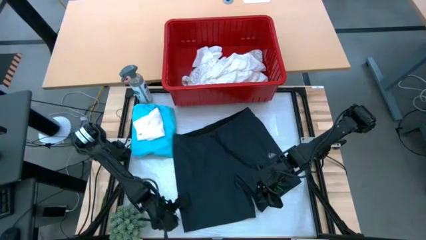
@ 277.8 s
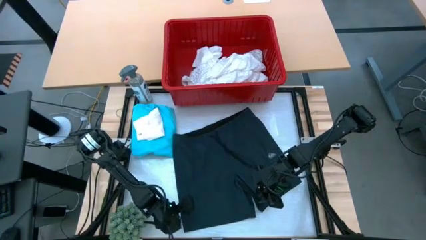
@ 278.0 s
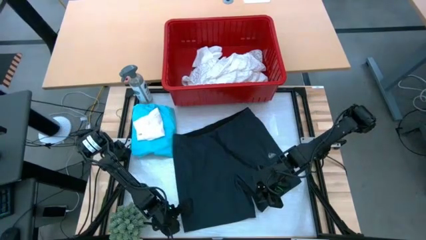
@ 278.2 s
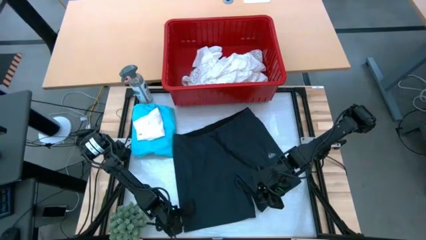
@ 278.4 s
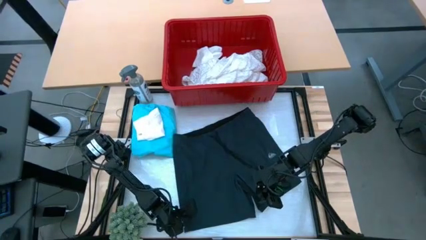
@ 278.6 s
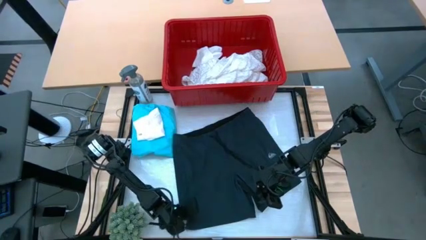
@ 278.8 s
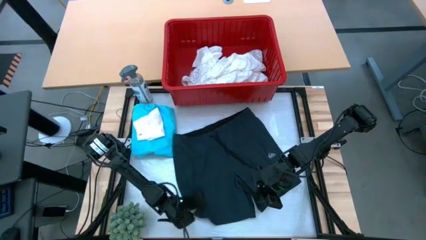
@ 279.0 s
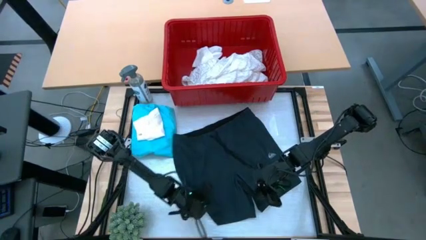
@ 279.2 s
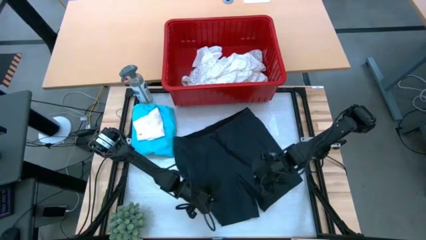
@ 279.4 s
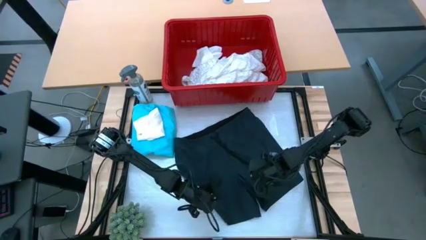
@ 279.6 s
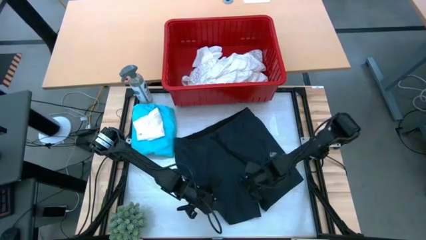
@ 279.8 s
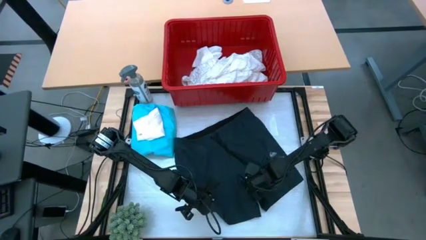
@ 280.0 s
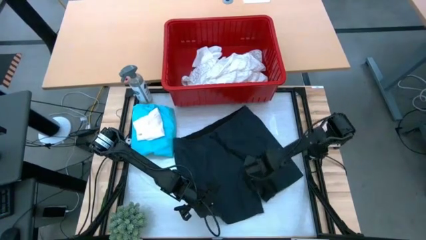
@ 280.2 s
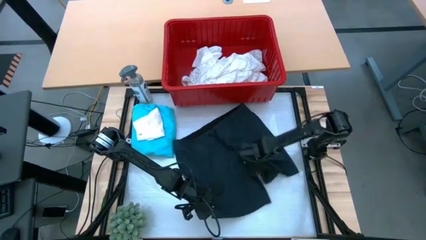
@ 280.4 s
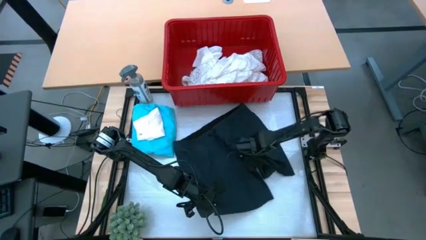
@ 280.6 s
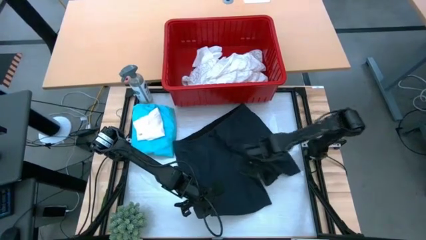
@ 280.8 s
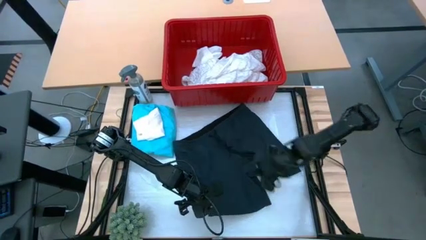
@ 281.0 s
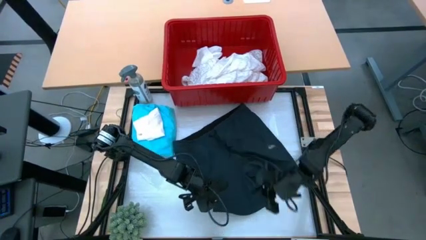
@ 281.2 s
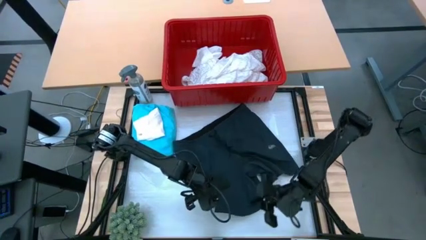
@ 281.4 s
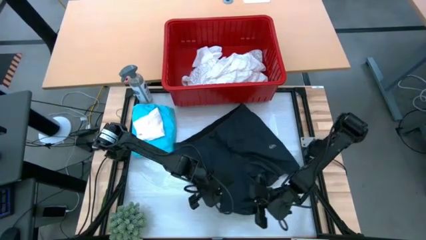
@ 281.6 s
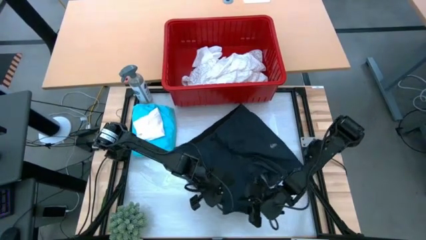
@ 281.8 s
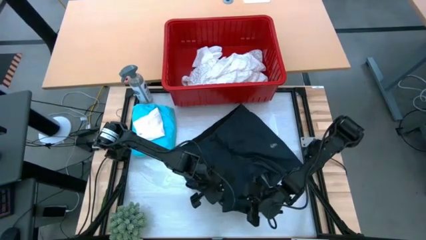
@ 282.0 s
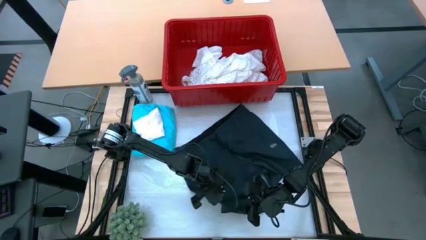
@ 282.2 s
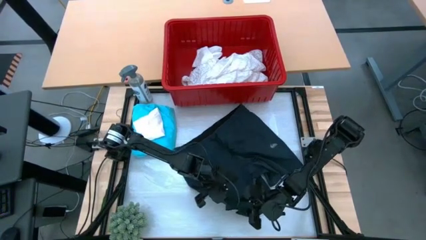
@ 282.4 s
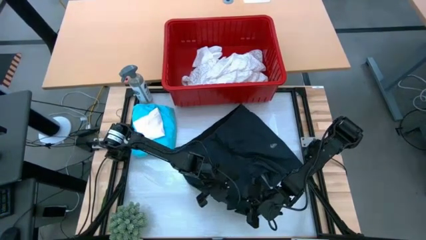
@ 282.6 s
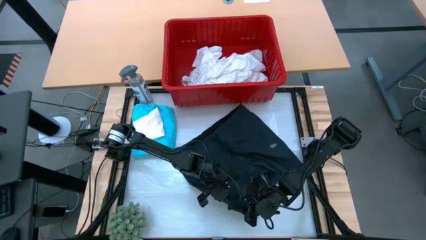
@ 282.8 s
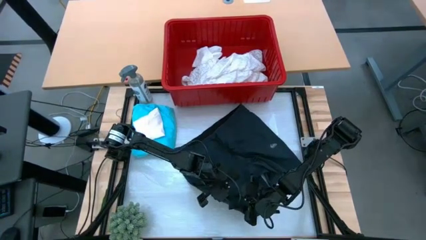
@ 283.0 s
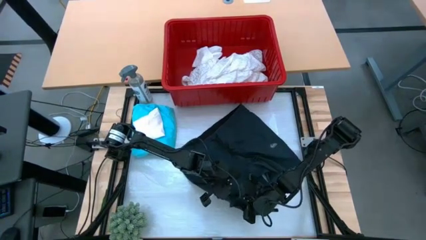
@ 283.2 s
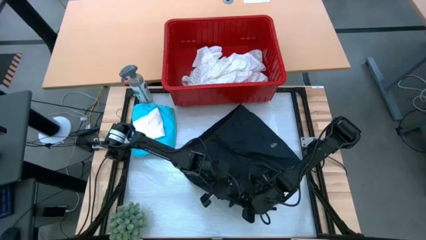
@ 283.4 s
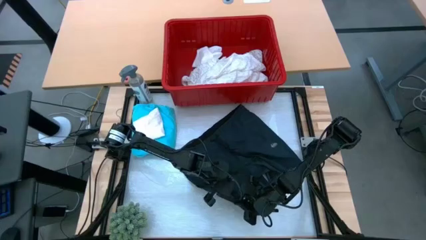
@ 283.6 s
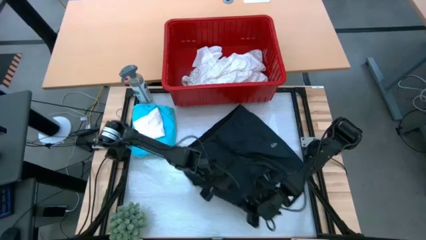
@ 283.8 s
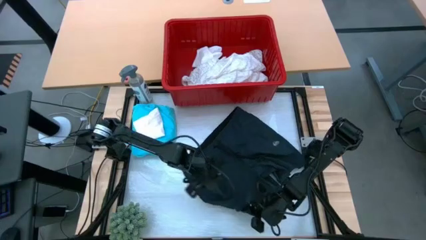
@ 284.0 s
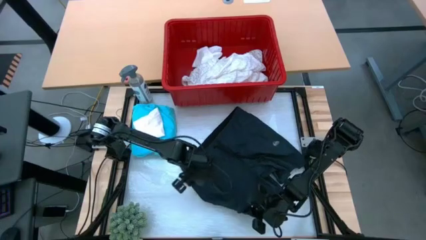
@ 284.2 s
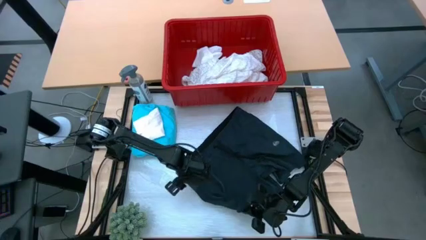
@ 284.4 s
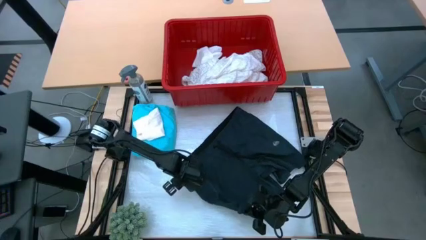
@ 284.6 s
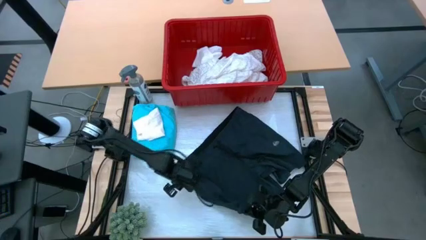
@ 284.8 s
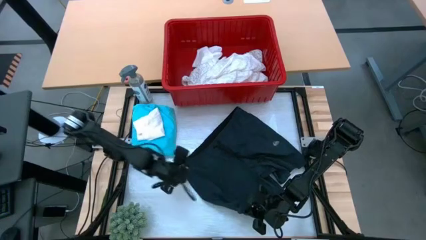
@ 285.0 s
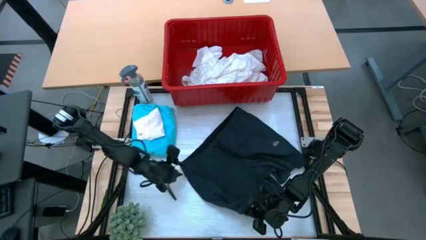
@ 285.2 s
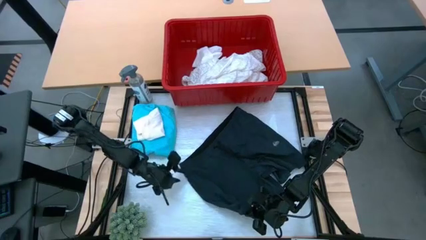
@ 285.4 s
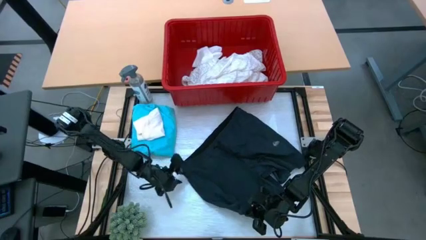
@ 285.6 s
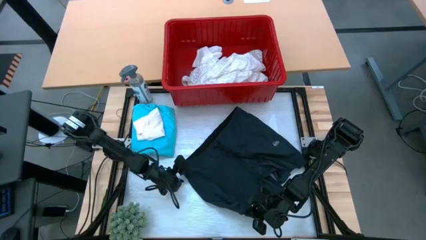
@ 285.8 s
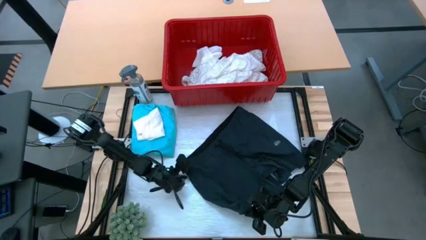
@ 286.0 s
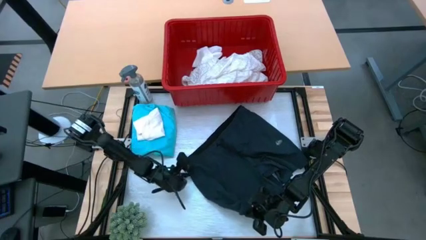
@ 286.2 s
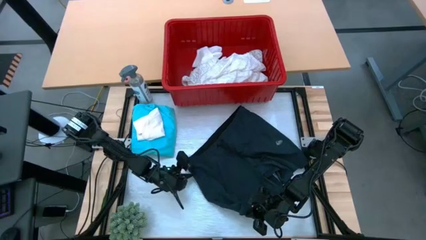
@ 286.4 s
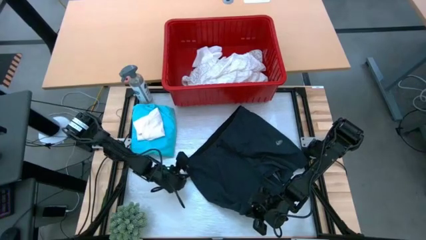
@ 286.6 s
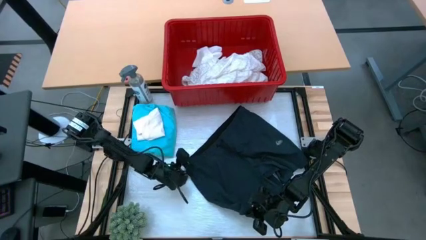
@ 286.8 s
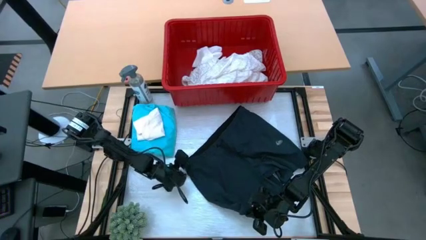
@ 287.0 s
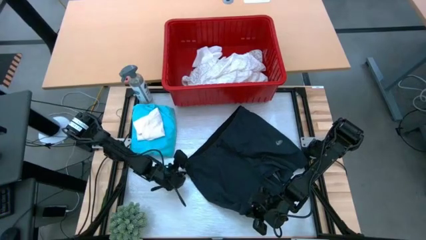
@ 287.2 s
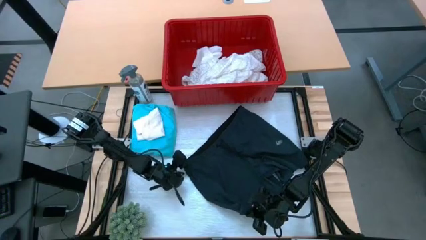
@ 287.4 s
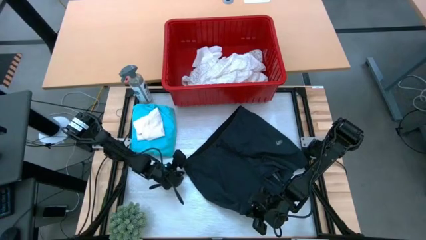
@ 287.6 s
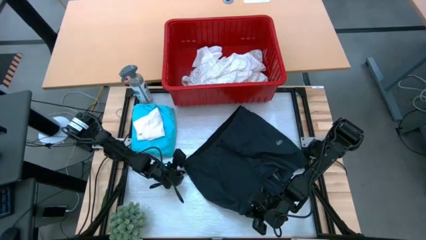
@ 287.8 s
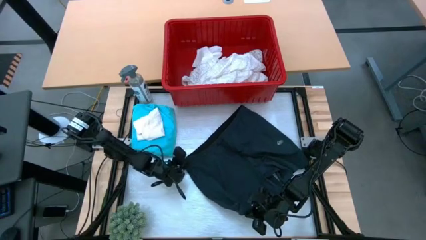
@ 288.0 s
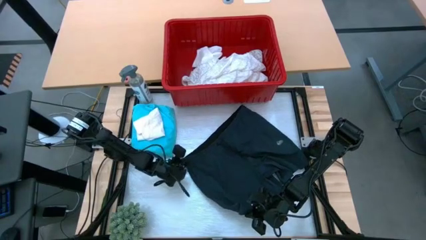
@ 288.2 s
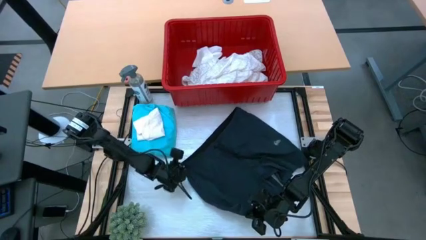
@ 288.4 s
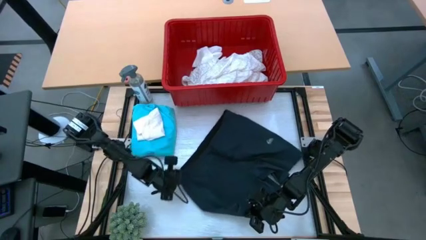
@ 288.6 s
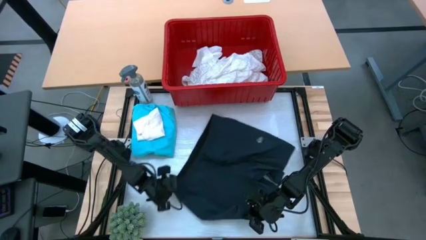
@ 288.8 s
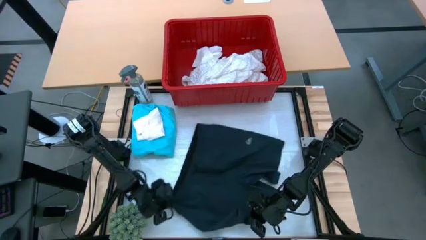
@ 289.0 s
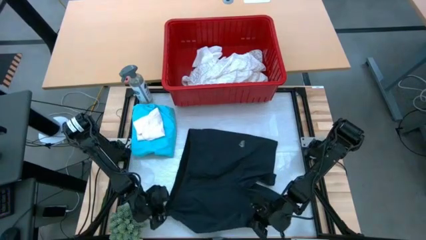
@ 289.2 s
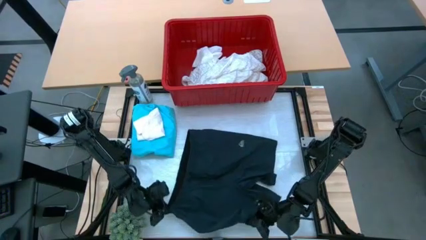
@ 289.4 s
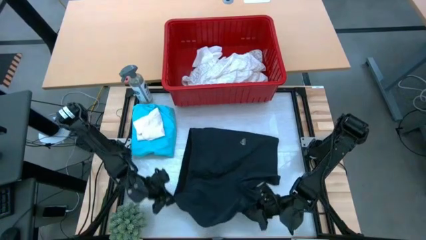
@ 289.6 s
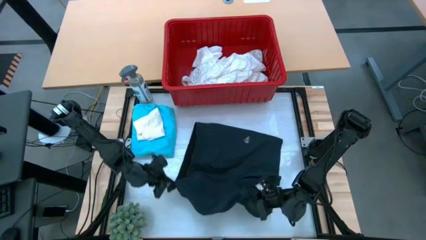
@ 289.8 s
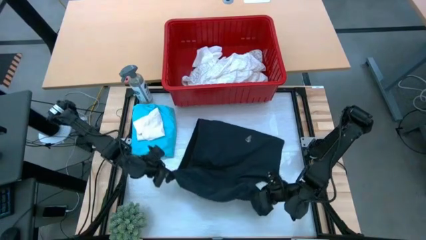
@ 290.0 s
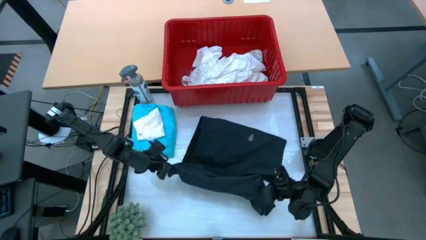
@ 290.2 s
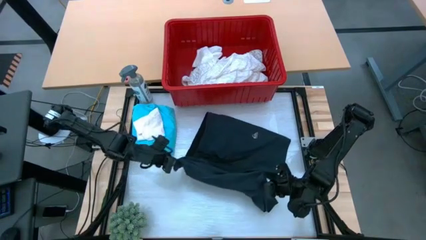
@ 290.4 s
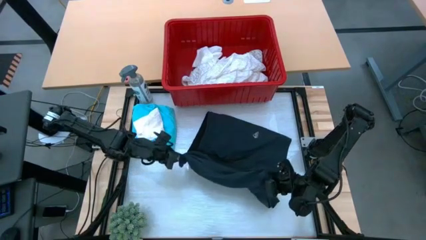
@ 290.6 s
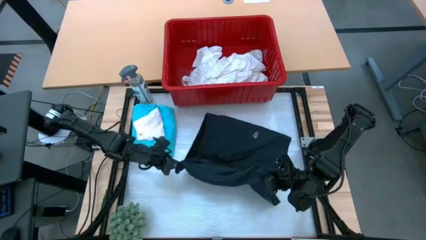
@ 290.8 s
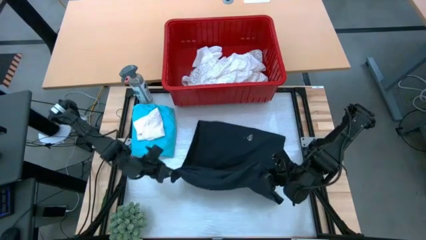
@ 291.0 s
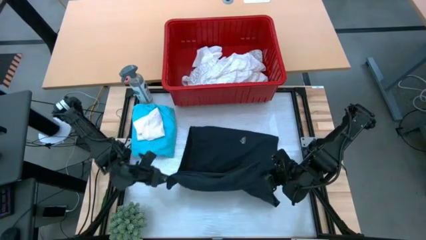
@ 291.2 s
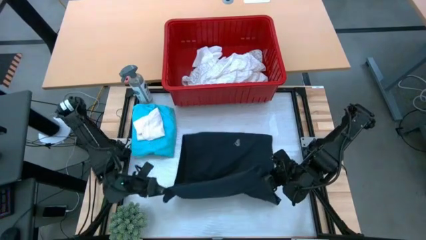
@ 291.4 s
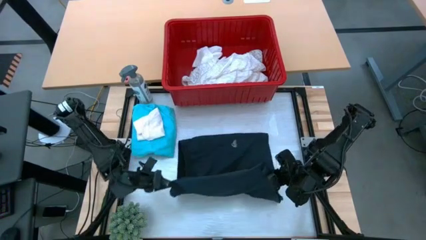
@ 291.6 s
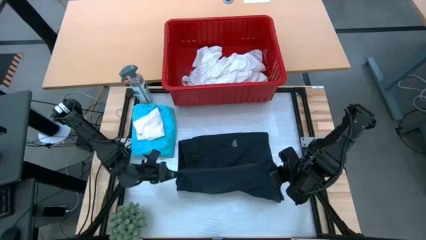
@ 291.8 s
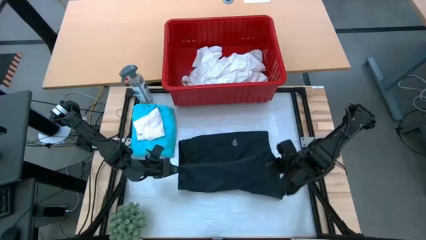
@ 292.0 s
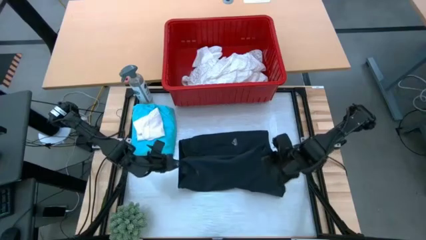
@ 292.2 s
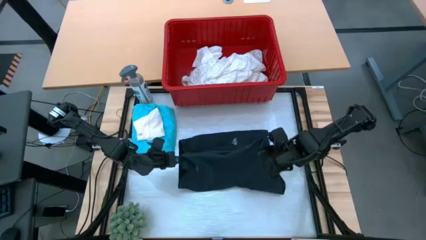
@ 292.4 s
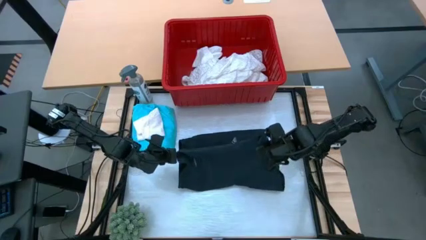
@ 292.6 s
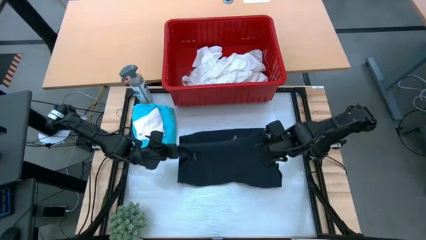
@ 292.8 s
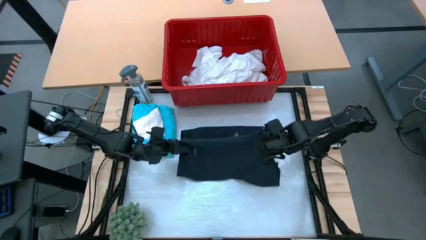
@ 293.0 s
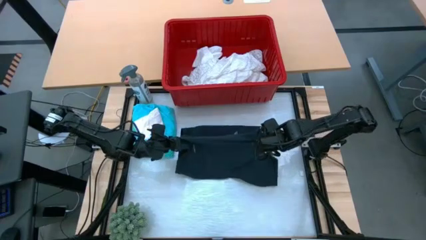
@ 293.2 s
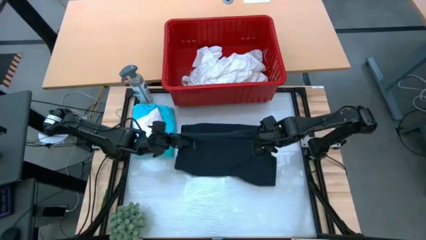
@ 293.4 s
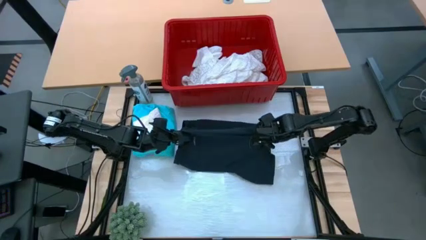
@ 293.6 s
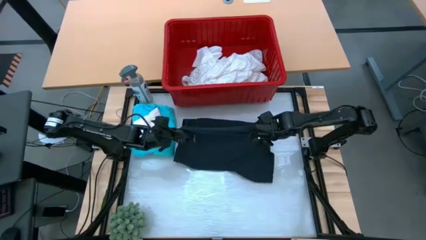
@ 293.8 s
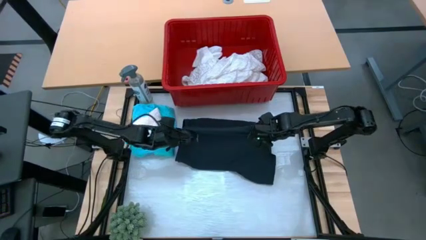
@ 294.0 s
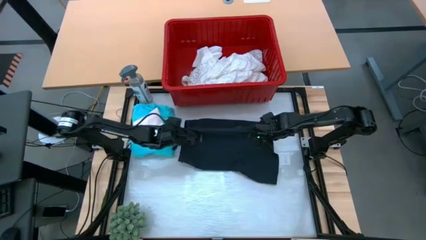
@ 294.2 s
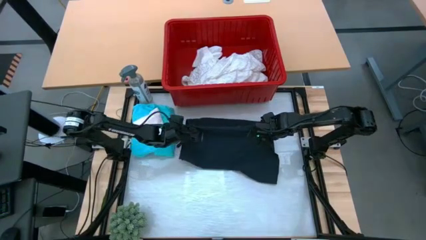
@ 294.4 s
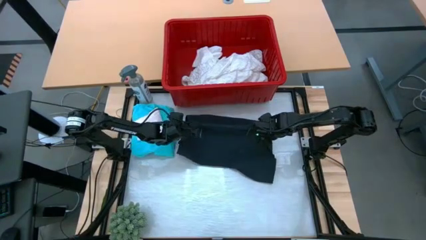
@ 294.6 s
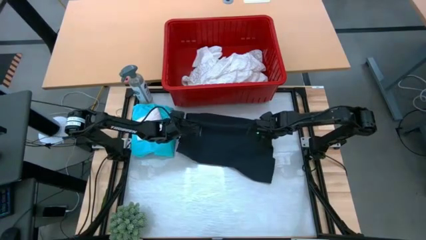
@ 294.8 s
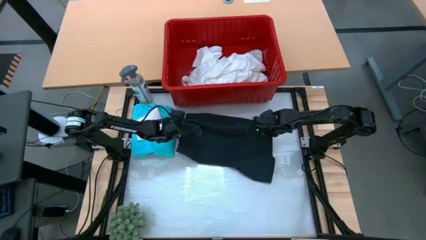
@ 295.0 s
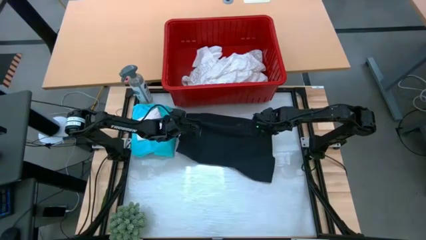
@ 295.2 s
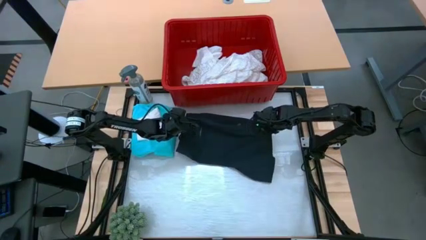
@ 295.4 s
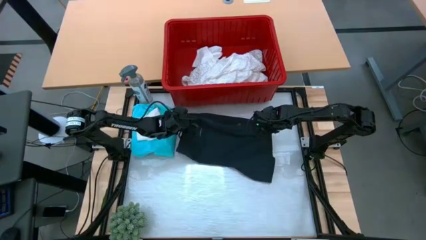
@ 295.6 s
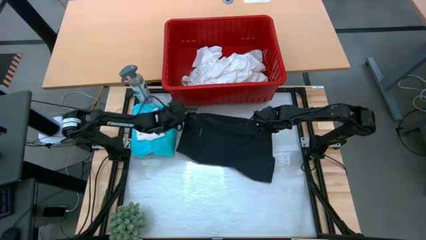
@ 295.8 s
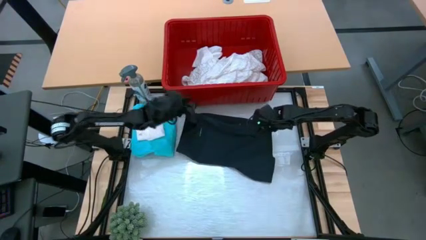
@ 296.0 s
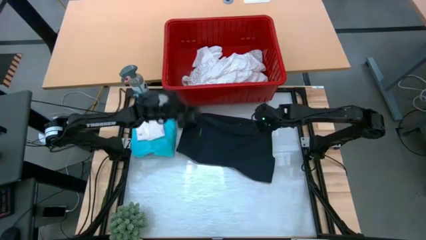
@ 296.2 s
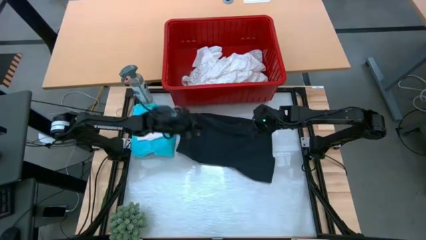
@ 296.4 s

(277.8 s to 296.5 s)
Task: Fold laundry
Fold the black shorts
